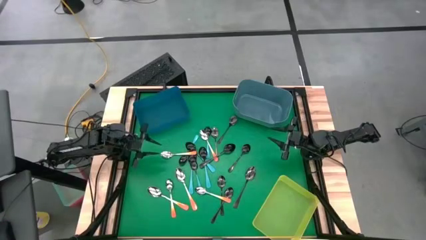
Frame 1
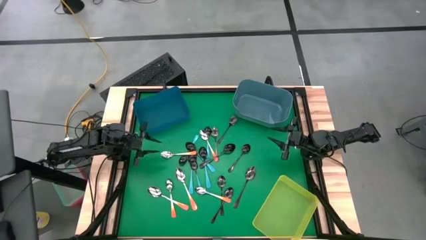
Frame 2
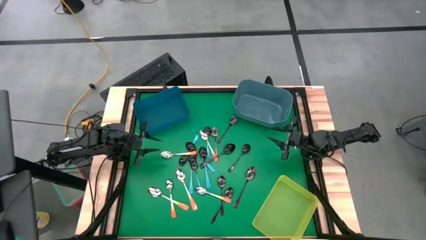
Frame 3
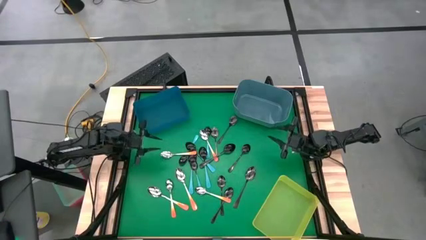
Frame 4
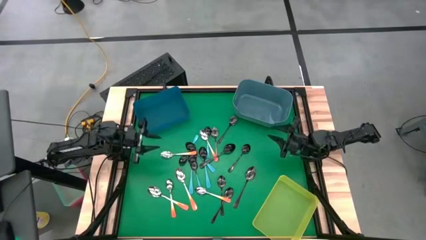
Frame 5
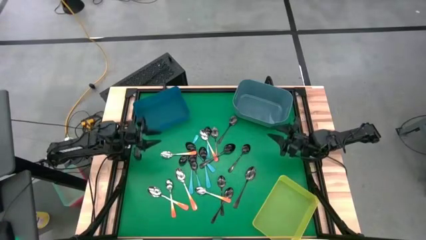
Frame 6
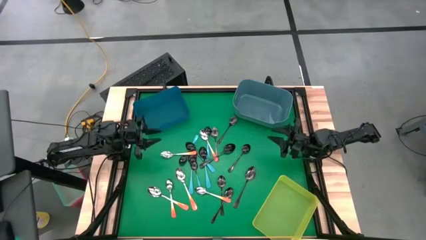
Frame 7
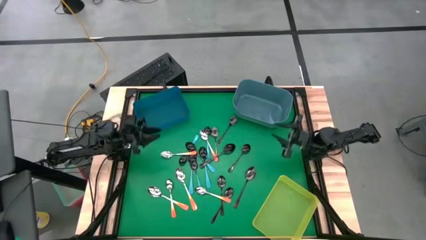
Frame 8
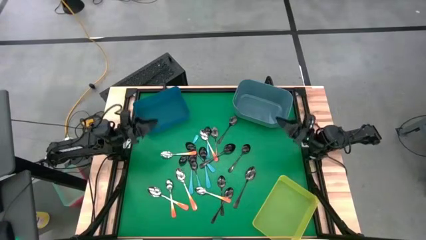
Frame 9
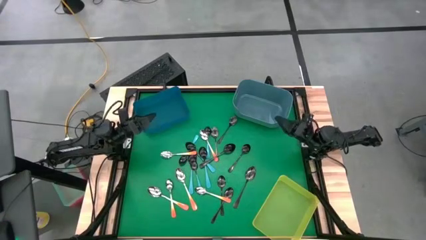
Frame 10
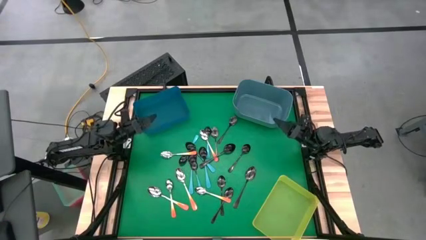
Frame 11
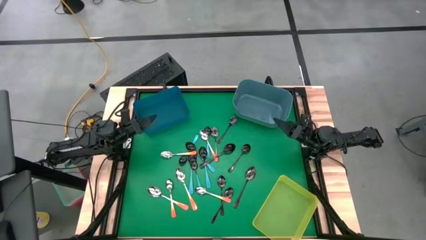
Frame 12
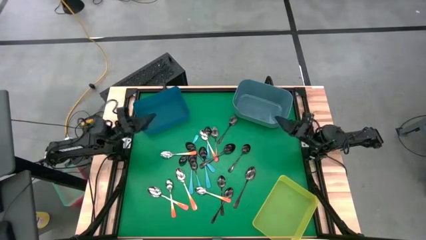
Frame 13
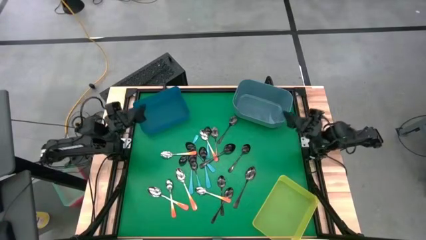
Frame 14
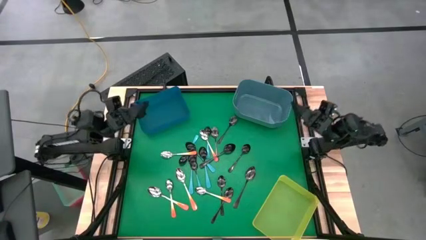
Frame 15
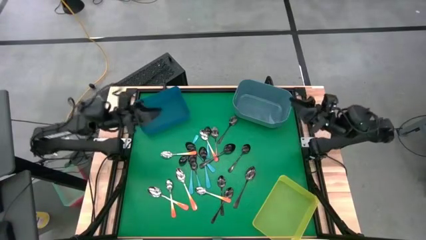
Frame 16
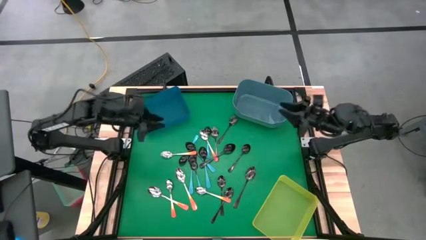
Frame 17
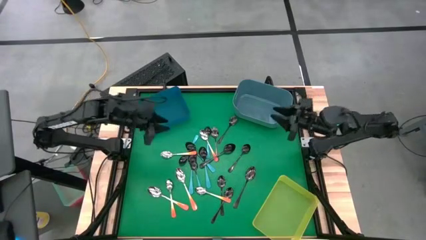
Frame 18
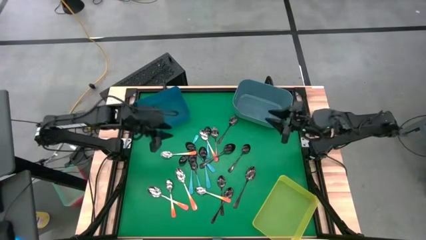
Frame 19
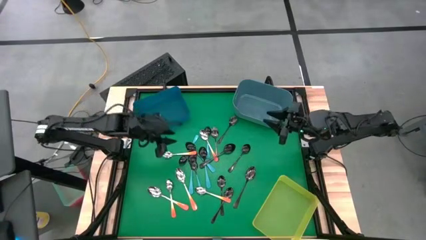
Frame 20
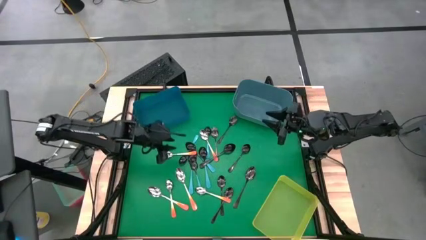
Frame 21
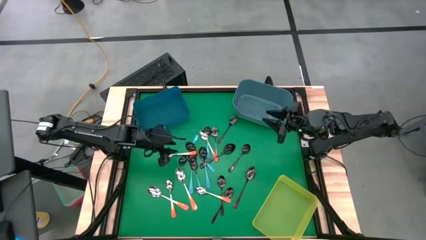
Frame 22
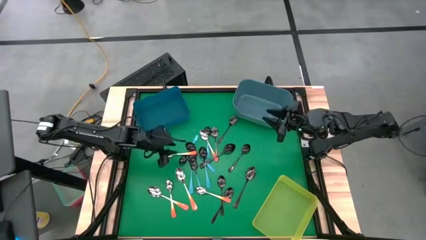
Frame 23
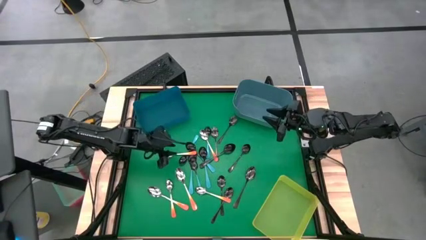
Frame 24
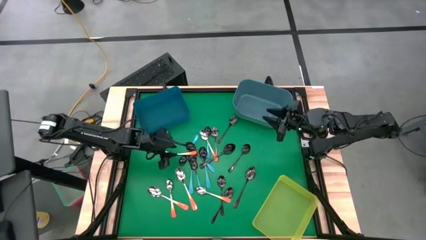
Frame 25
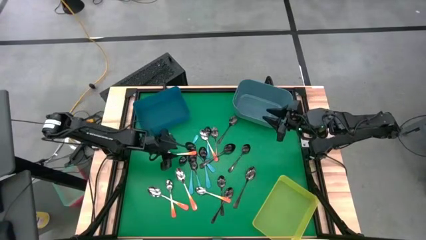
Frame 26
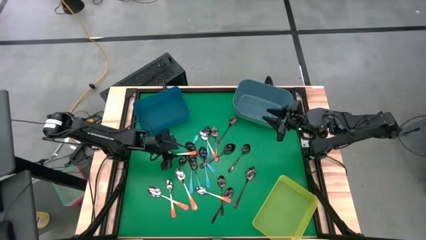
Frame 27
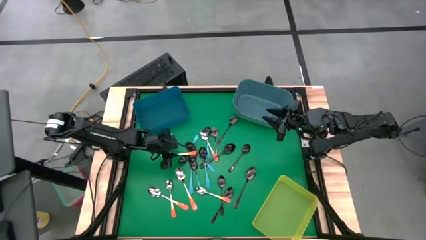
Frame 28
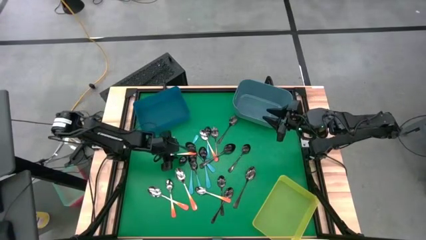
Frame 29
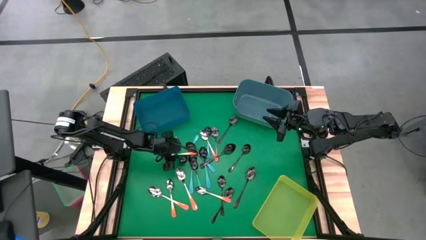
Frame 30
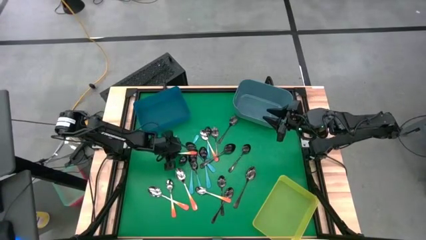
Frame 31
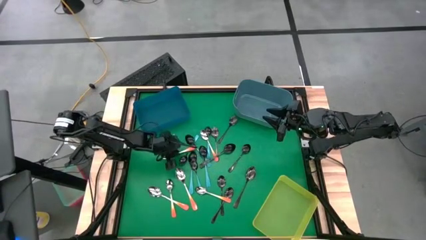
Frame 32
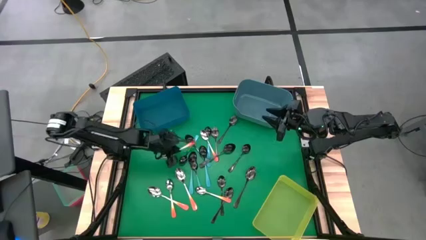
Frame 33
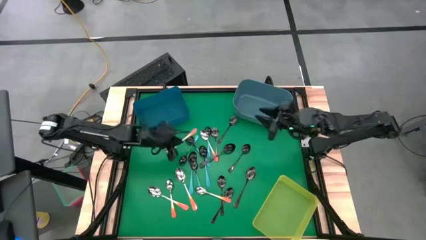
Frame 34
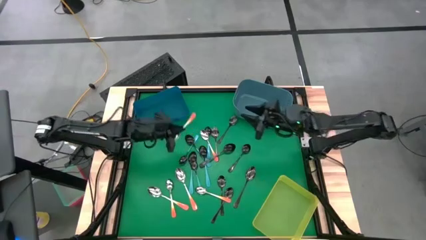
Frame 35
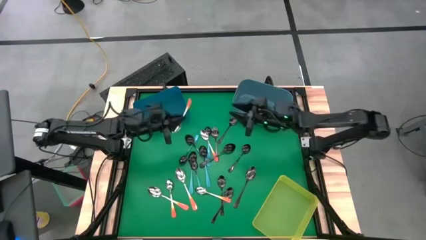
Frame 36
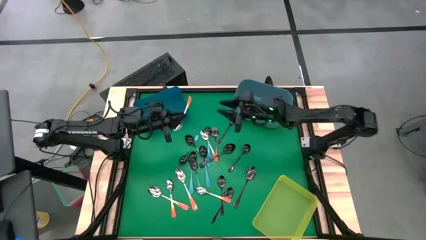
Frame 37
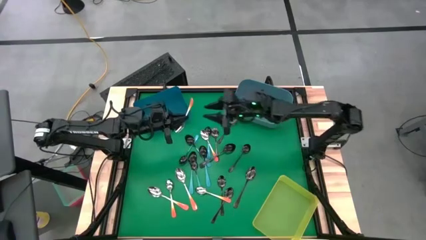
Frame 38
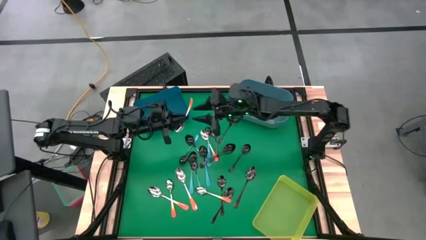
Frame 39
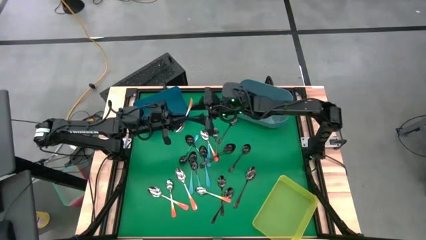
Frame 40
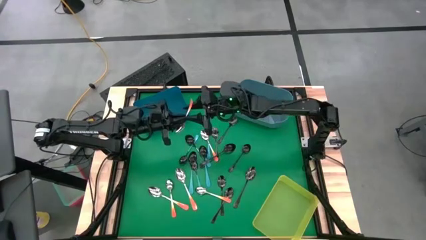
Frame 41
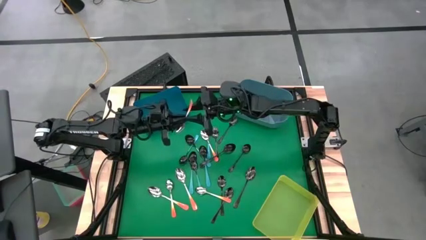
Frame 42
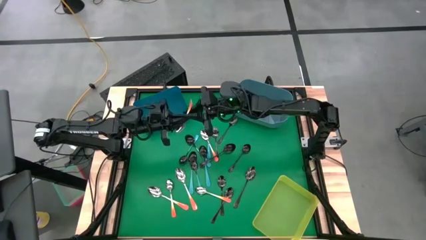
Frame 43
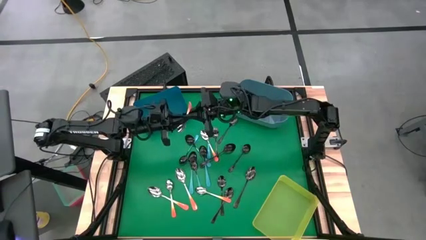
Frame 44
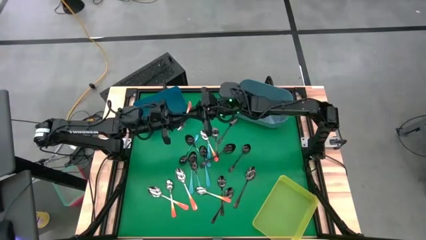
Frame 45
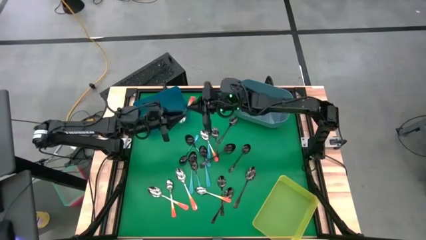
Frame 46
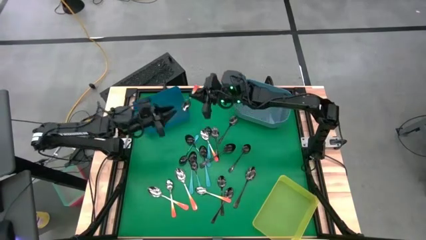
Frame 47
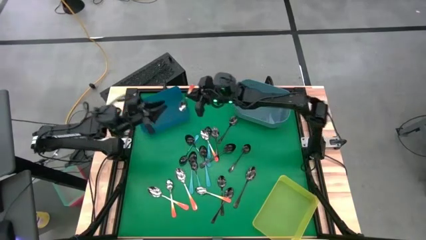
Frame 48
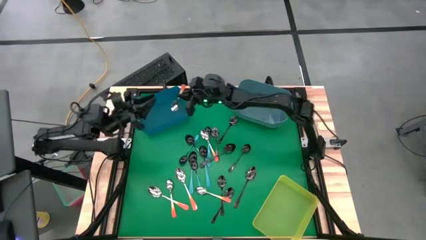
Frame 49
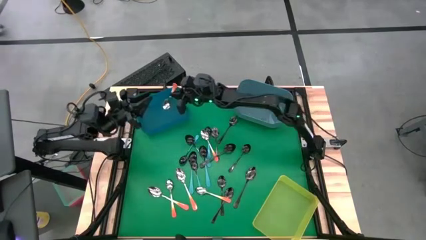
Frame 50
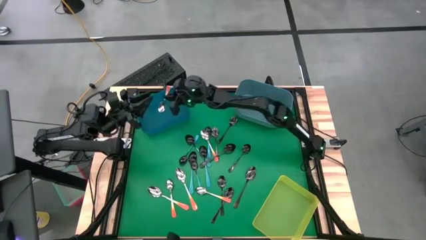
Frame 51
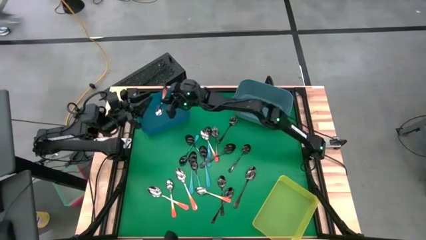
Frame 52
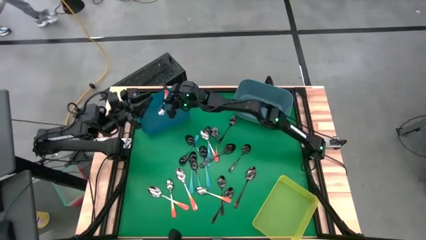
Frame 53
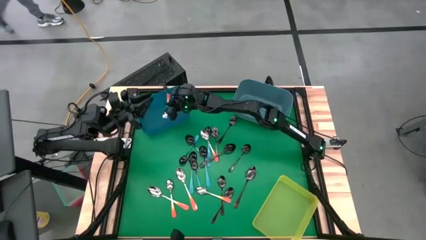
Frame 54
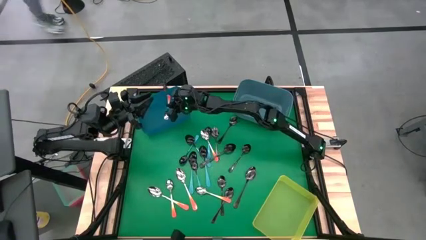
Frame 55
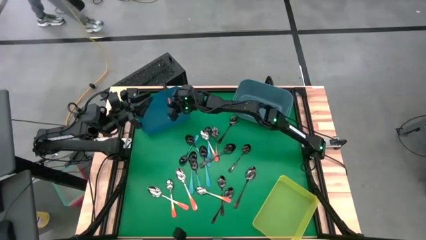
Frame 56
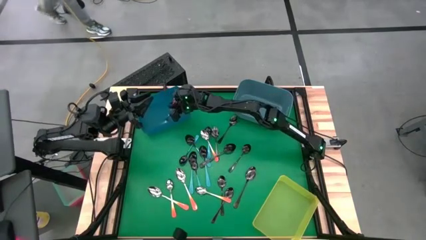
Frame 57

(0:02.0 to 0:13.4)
Task: Sort silverware by color (type)
Put the orange spoon into the dark blue bin
